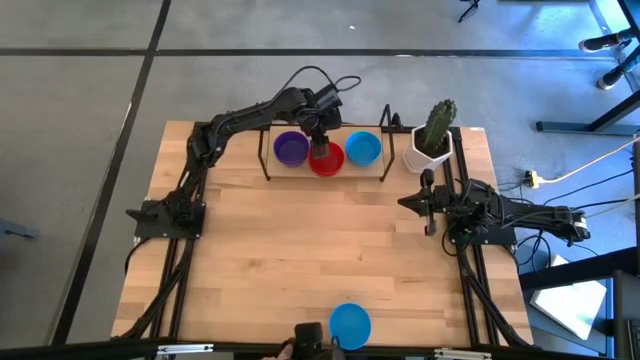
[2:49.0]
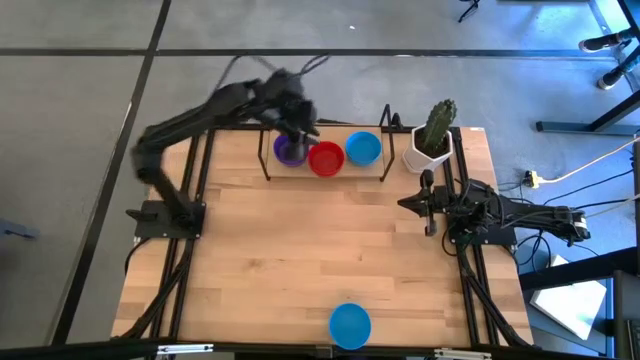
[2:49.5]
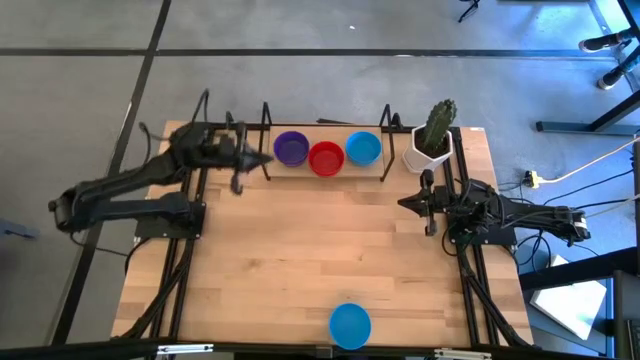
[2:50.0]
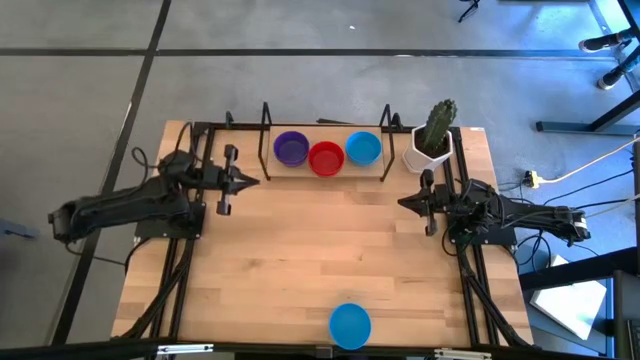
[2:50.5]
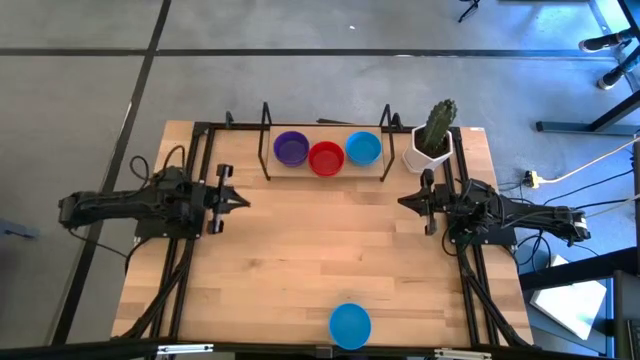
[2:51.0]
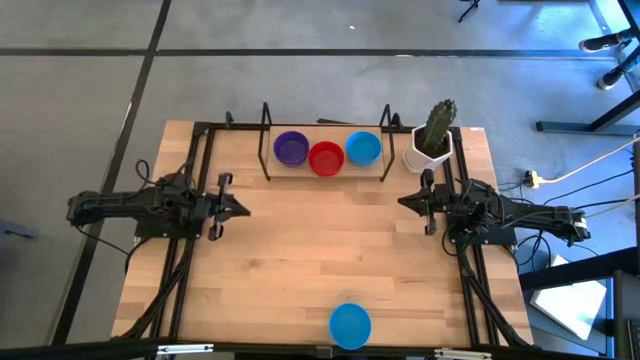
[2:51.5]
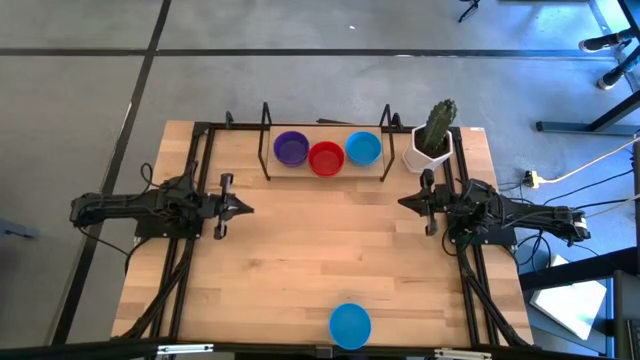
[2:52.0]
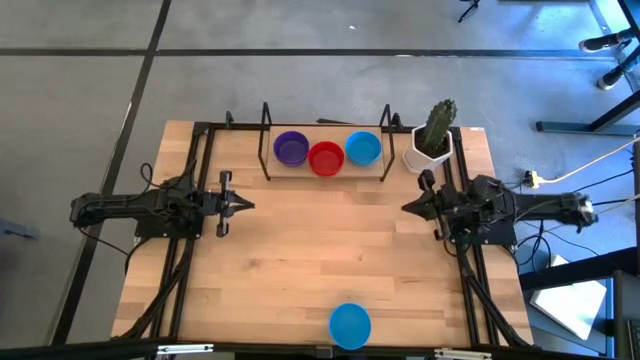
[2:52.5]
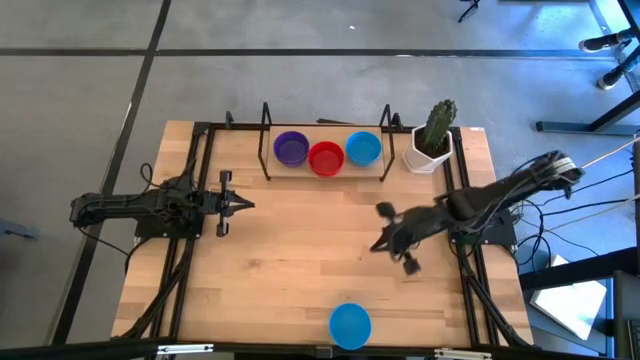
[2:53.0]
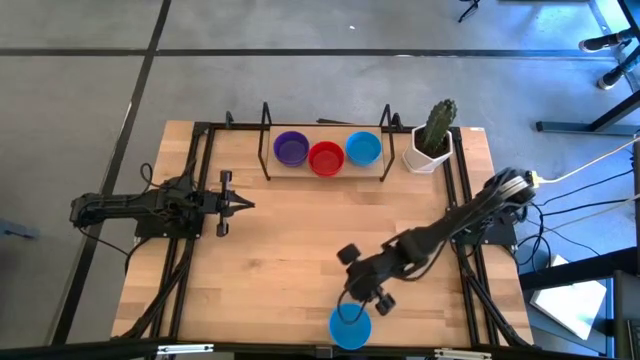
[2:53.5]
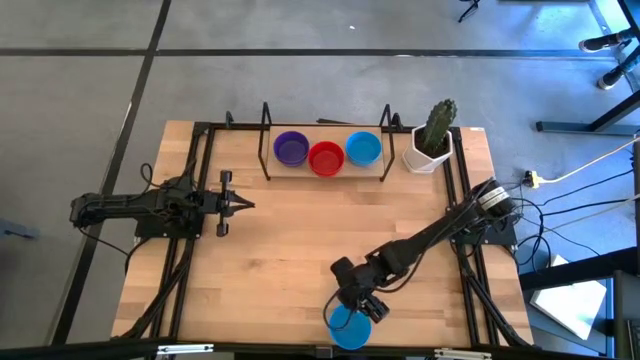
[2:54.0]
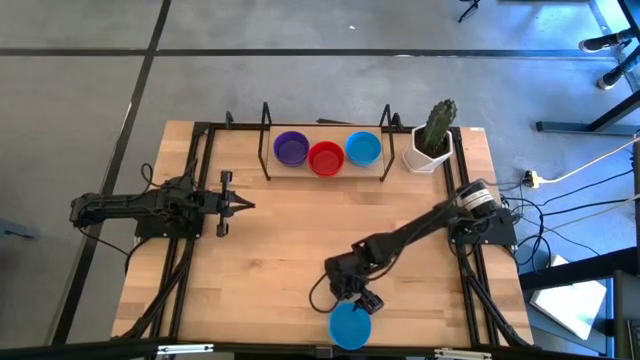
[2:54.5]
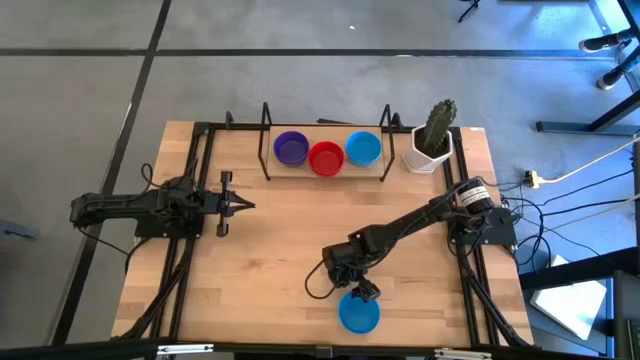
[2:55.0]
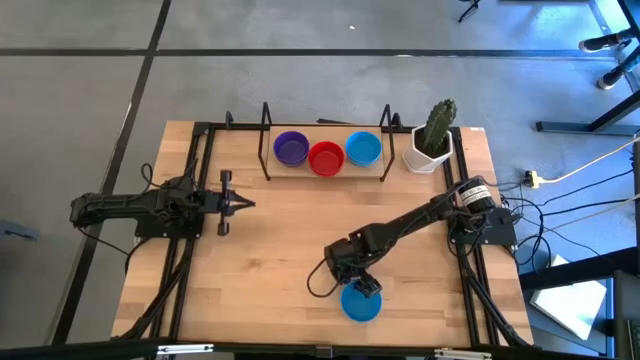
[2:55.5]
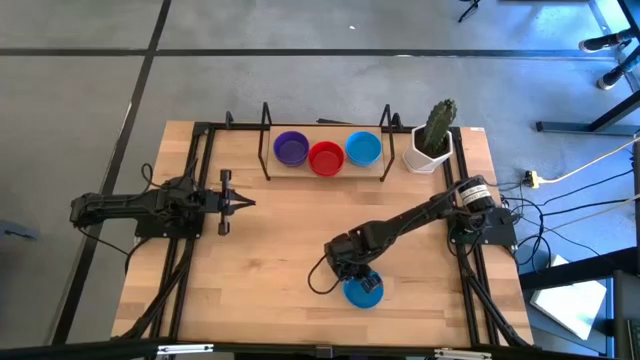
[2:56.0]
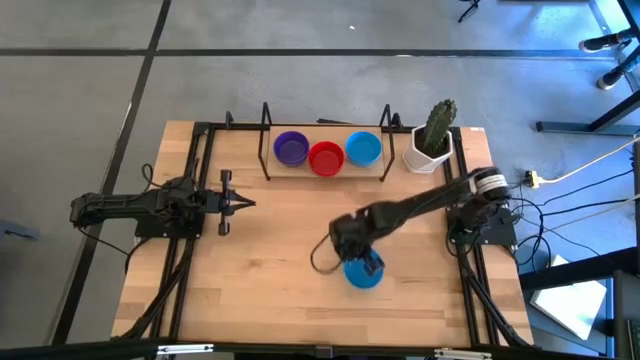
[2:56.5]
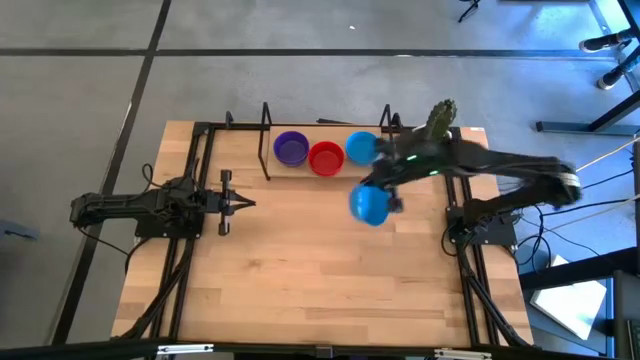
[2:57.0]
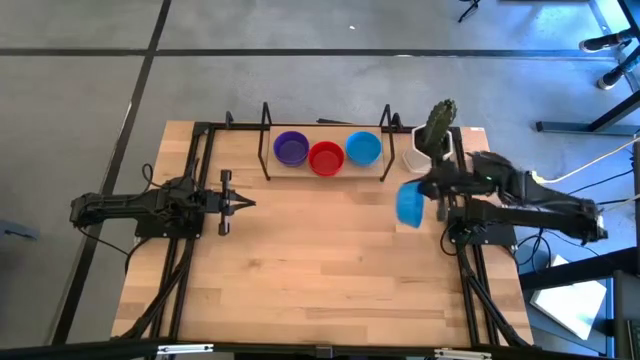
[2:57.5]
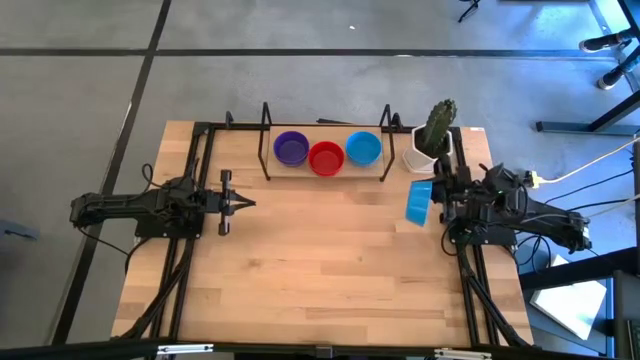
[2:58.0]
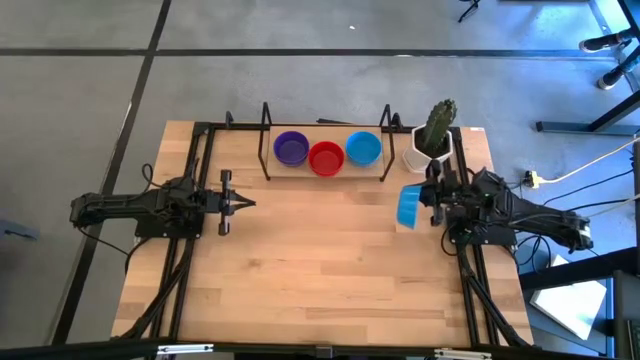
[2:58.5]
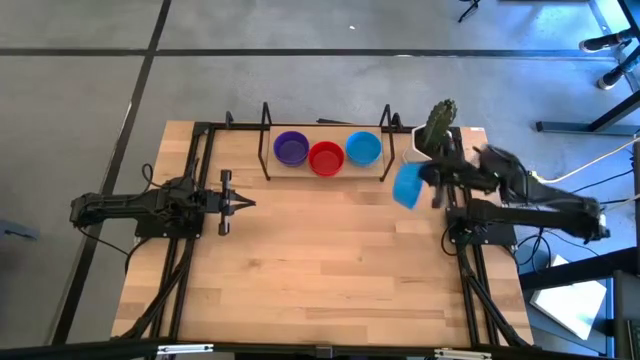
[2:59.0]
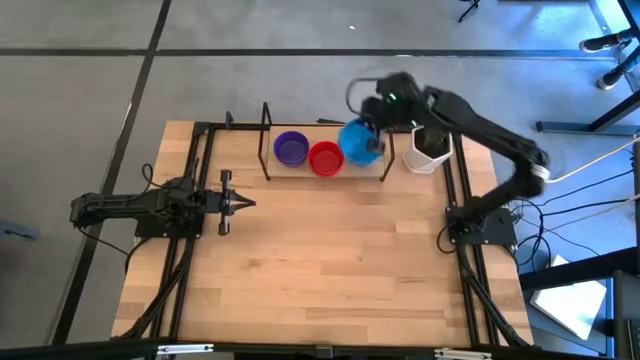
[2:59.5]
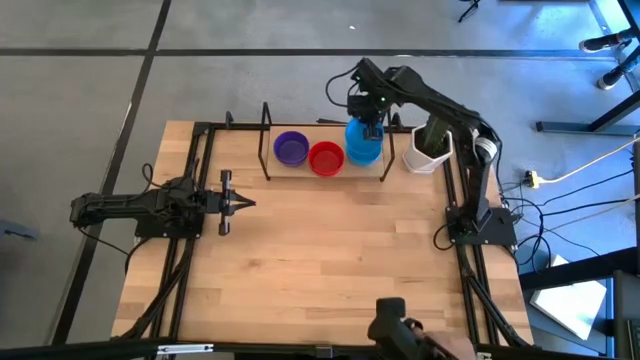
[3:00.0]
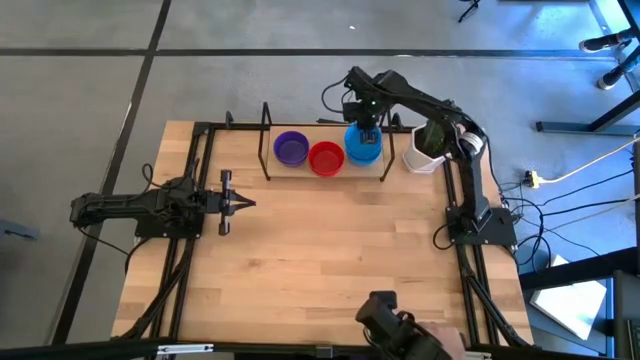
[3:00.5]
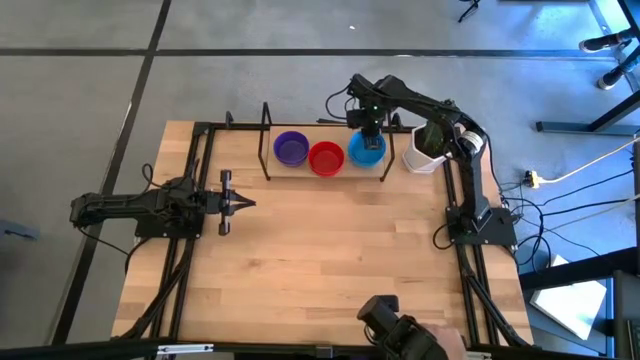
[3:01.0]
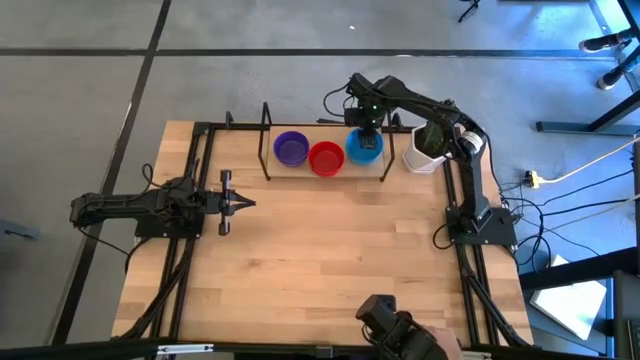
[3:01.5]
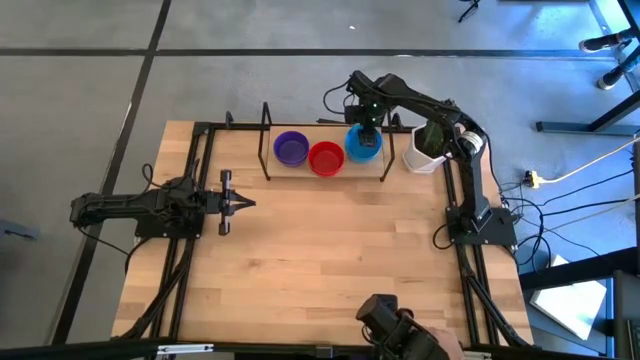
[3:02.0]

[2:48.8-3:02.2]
Task: Pick & Place Mini bowls
Stack the blue bowl on top of the blue bowl on the shelf

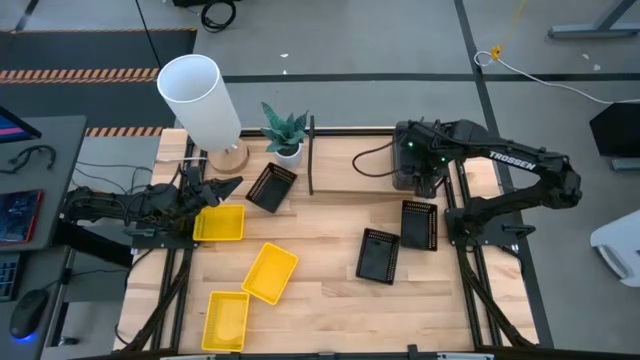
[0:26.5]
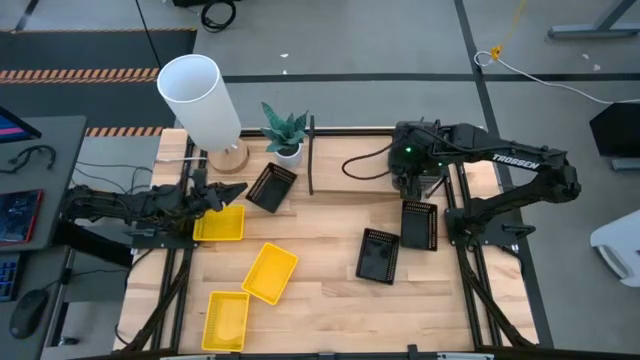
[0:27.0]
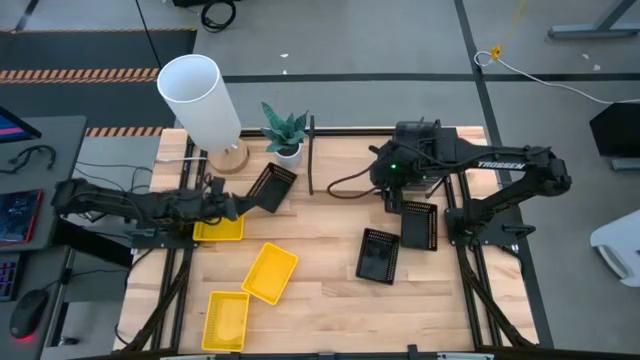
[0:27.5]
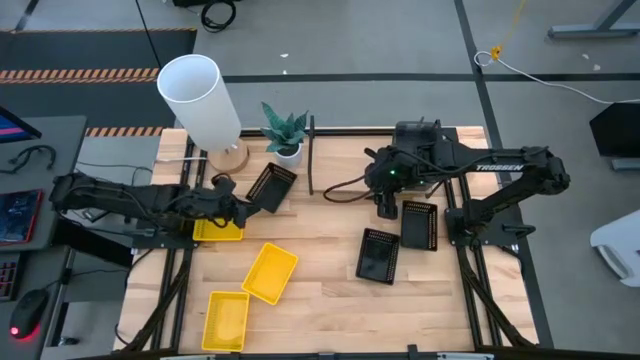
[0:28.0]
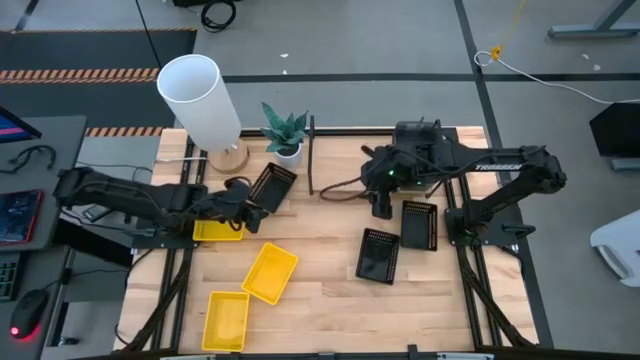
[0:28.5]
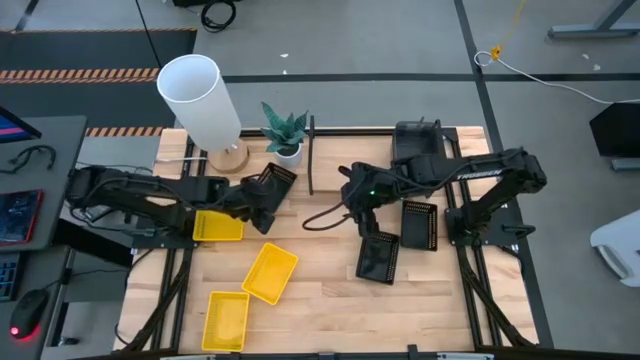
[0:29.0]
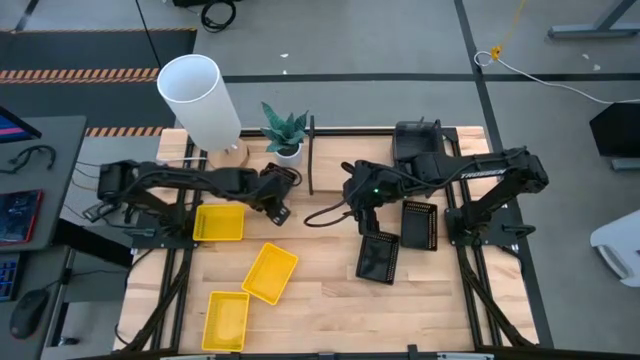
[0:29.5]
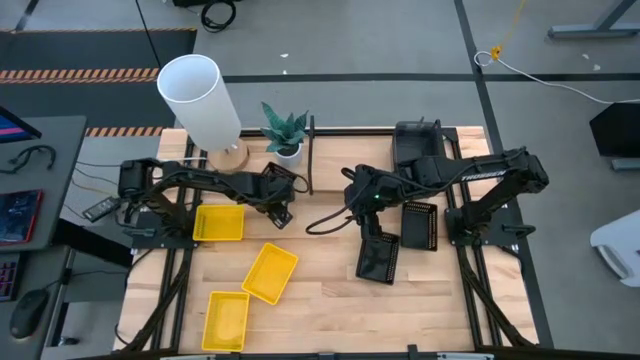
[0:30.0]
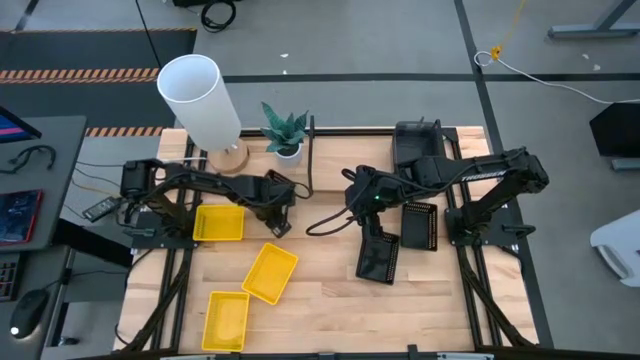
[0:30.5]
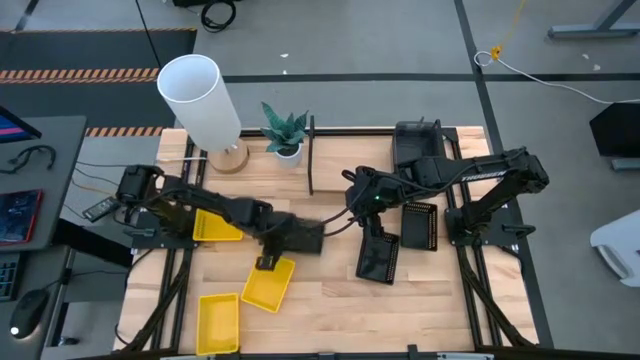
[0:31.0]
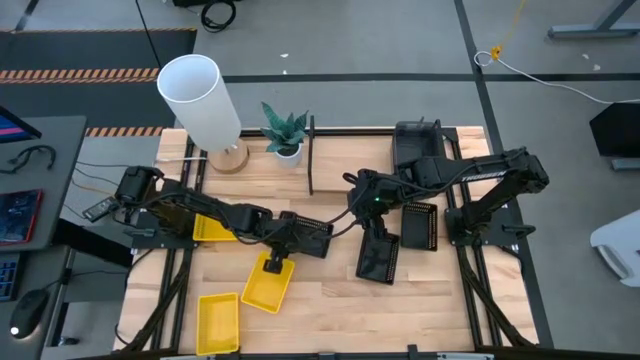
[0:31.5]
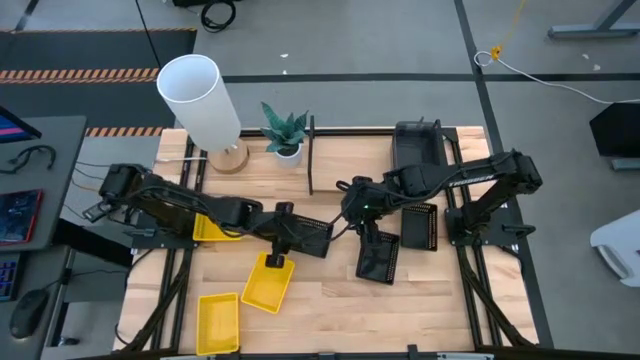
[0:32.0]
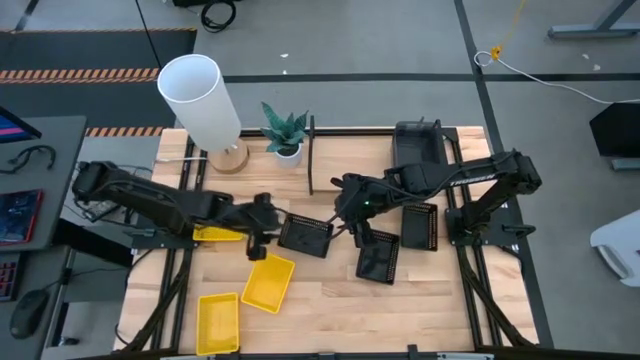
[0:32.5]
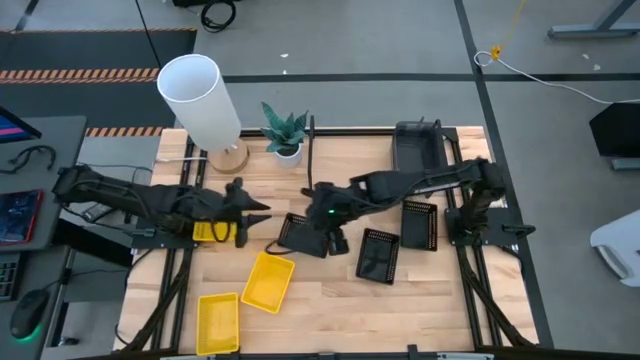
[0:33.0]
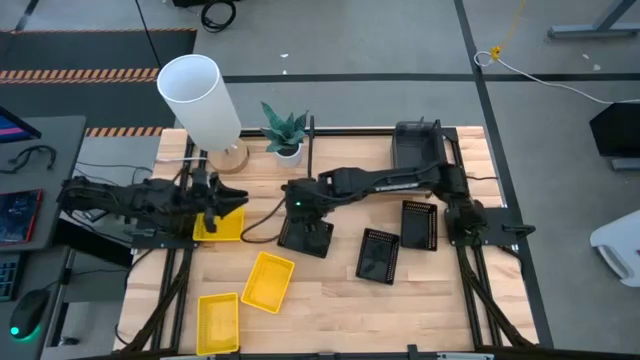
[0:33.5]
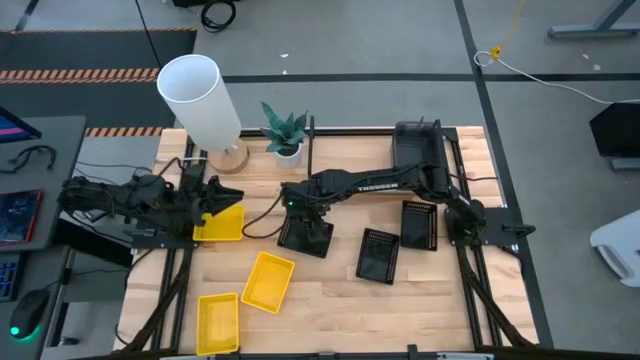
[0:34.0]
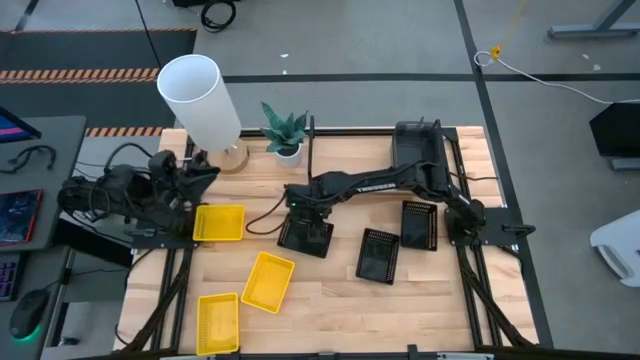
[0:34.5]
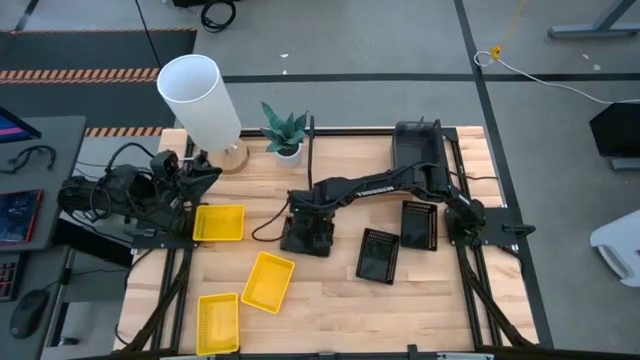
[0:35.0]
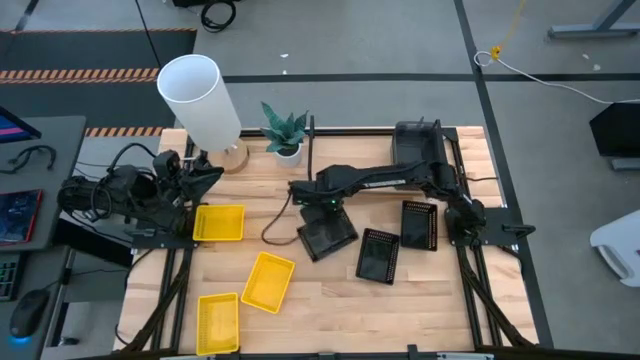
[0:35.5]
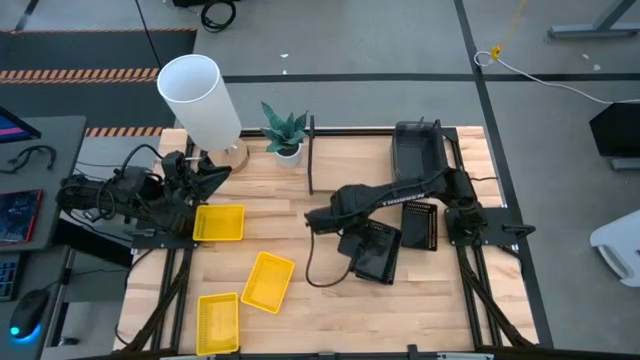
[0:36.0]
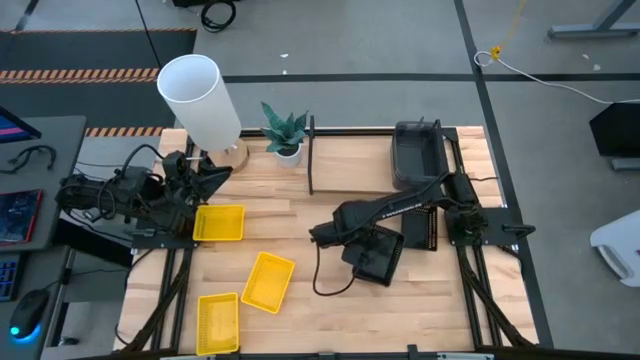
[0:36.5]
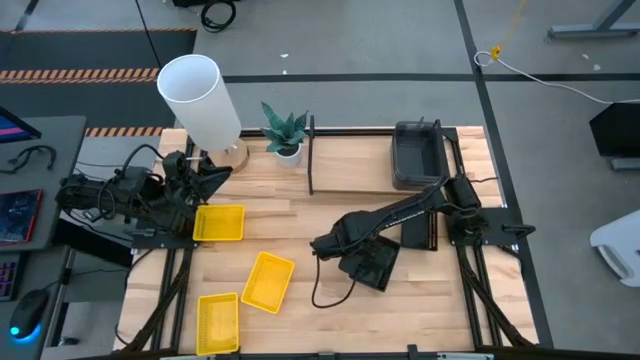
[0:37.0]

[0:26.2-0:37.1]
Task: Stack baskets on shelf by color
Stack the left black bin on top of the center black bin
